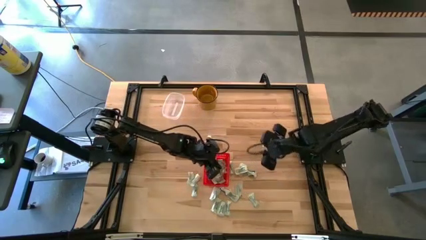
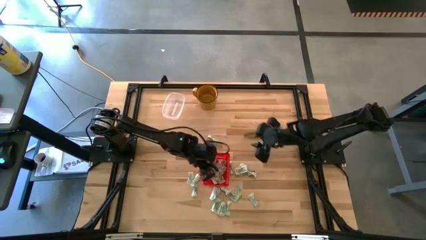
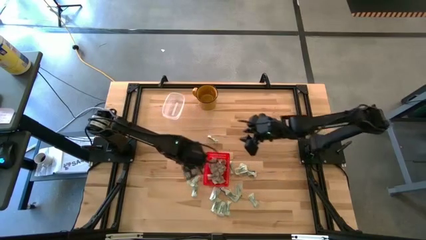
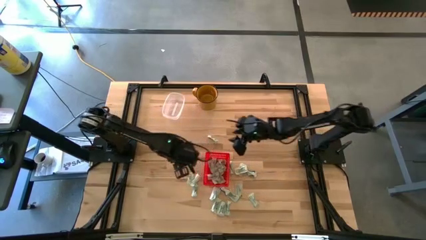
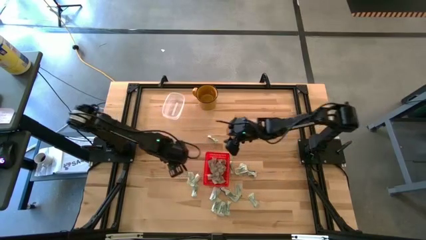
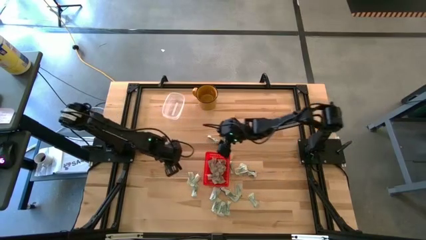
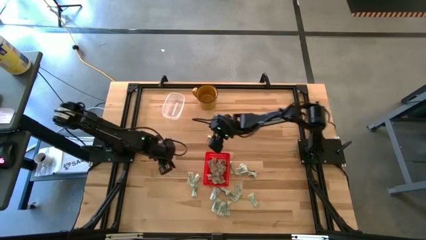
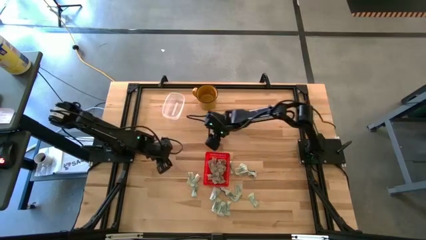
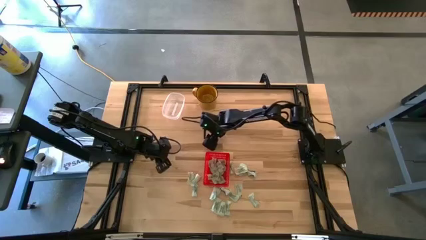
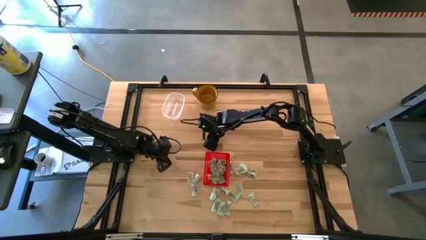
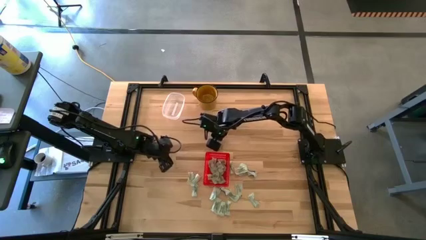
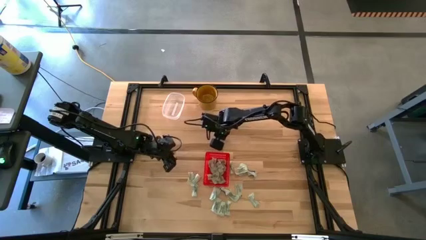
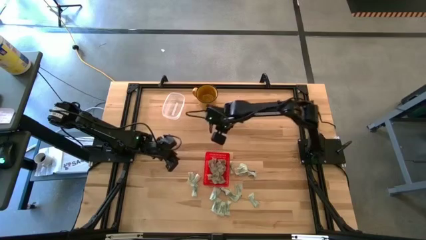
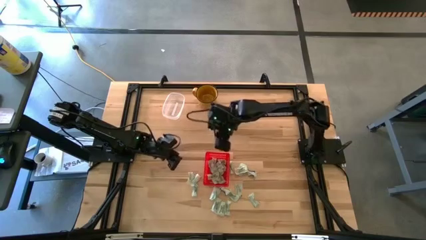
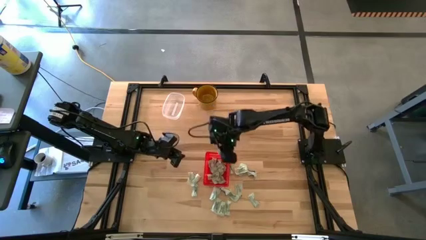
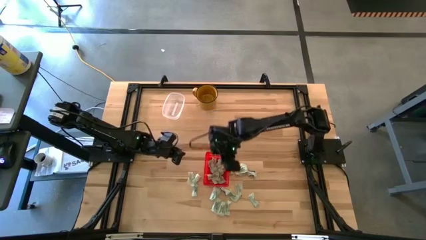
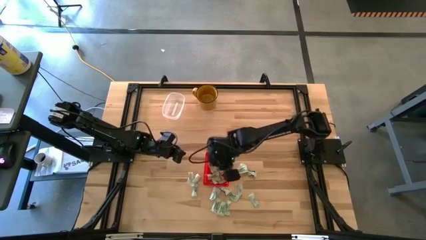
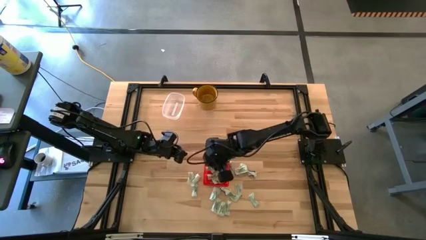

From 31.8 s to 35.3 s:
Task: Pick and place Stevia / Truvia into bins
Put the white stevia packet into the red basket

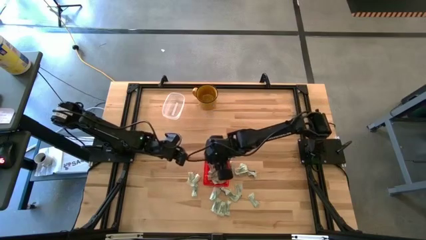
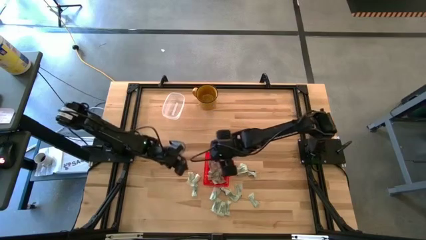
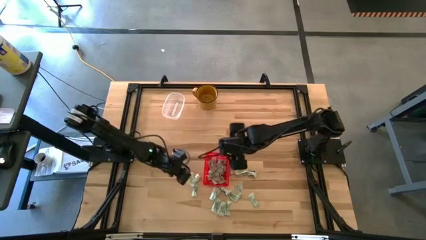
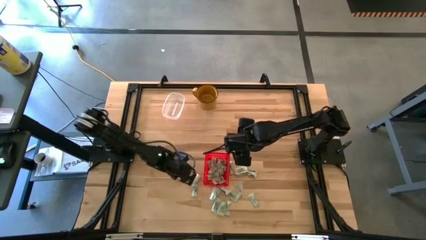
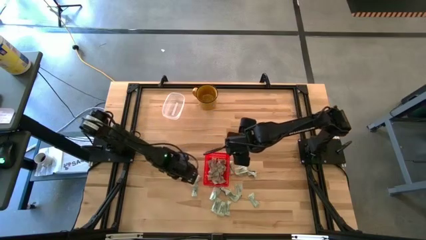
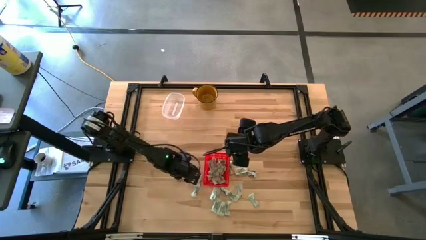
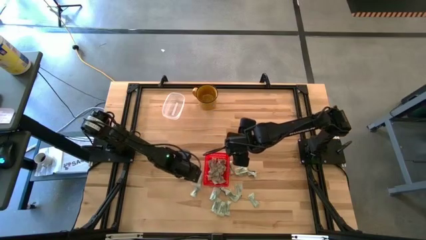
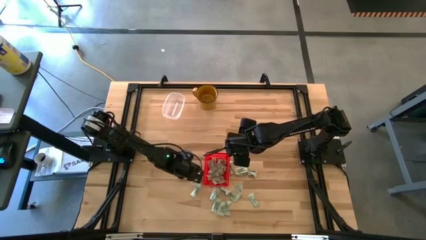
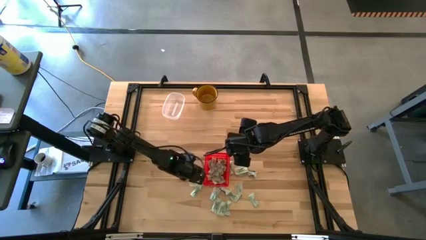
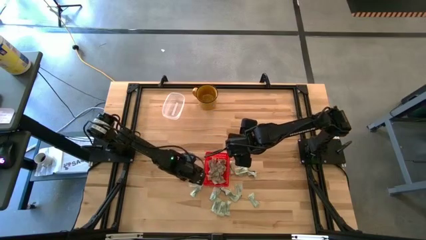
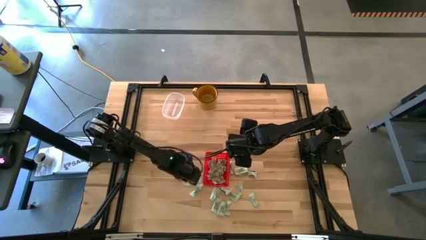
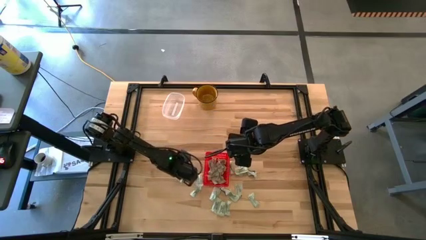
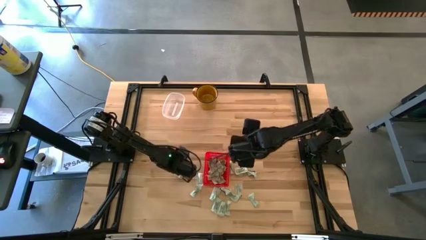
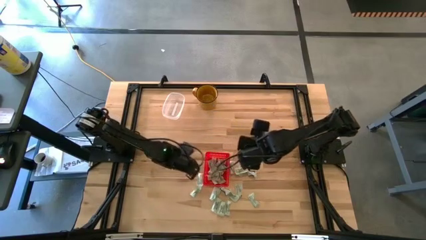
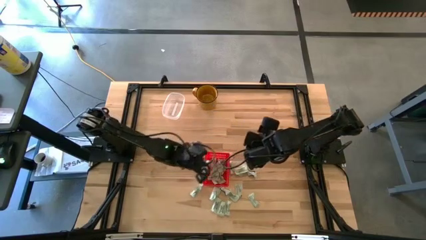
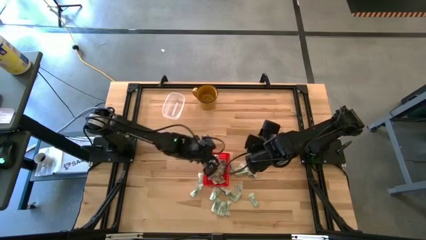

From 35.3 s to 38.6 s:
Put the white stevia packet into the red basket

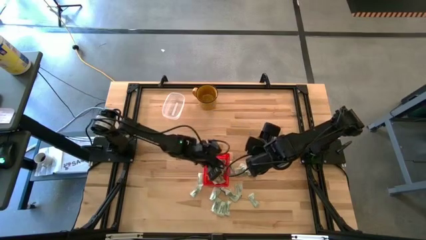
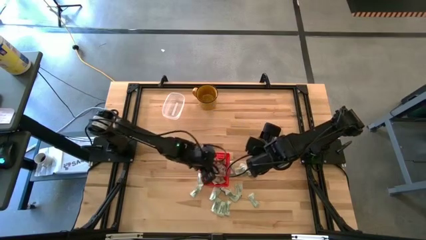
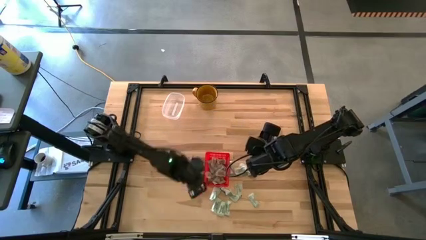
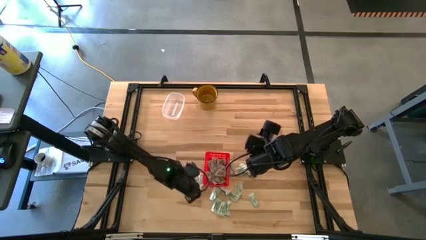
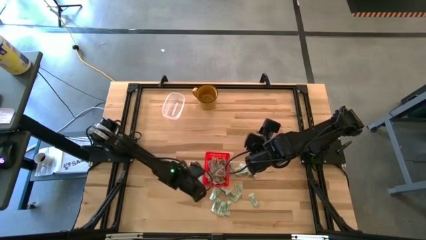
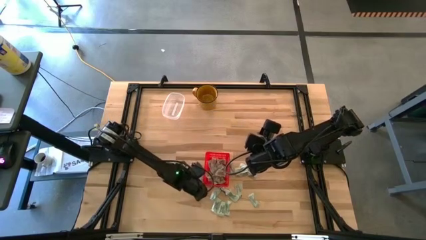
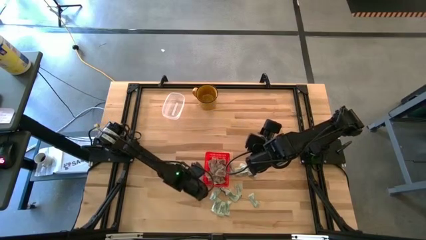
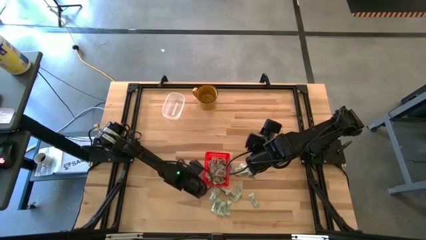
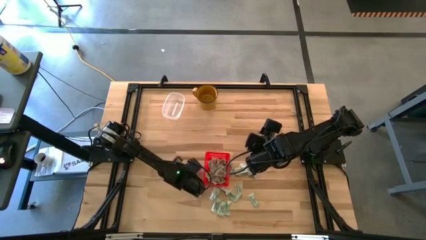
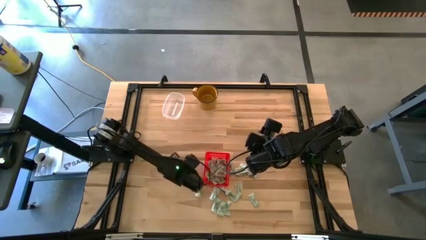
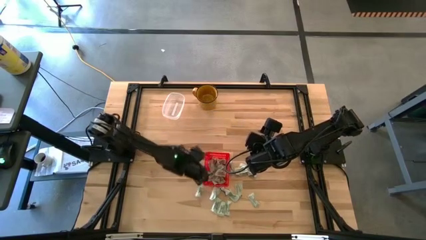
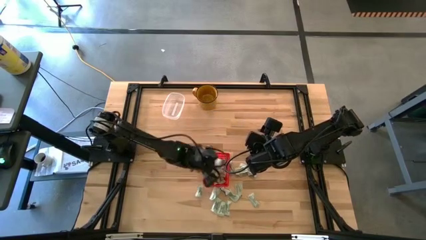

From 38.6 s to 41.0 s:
Put the white stevia packet into the red basket

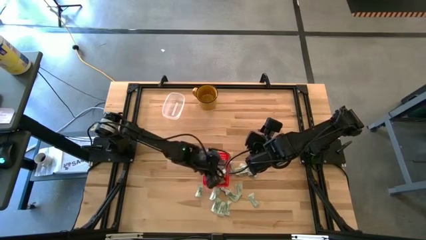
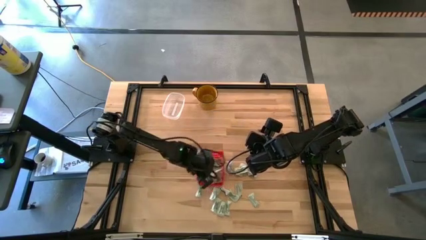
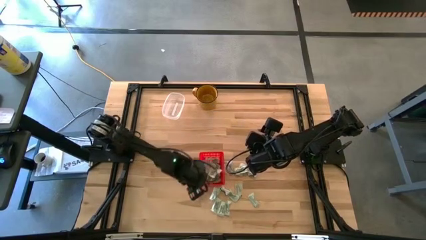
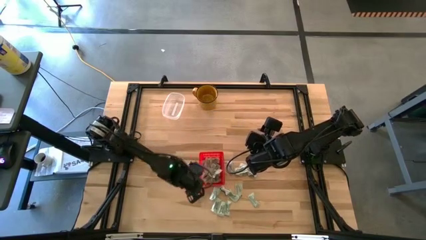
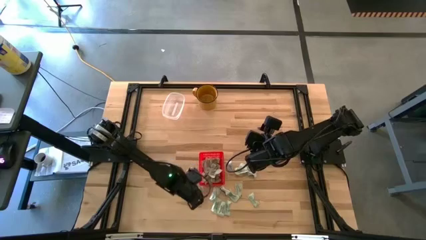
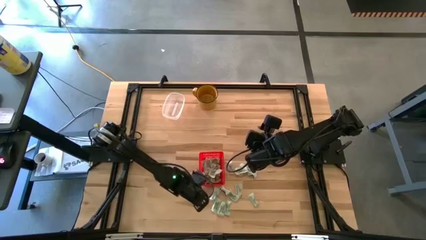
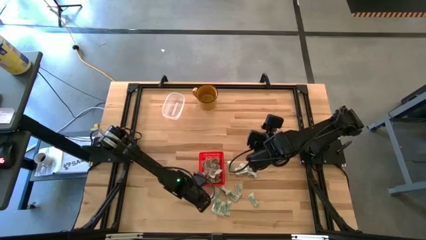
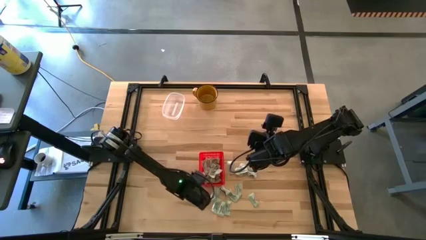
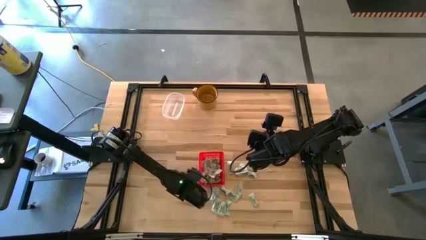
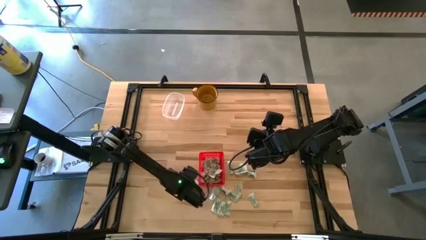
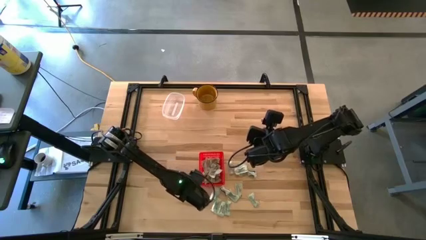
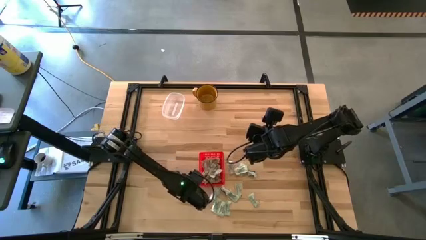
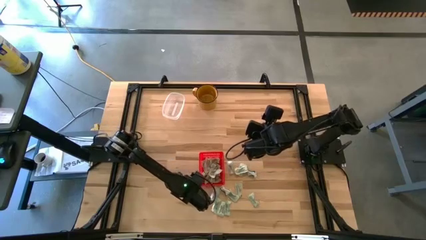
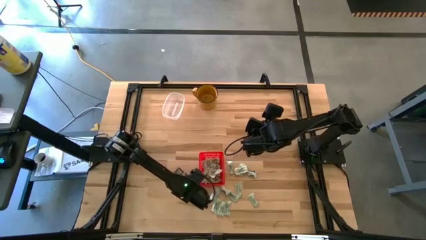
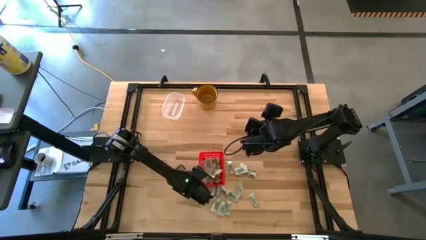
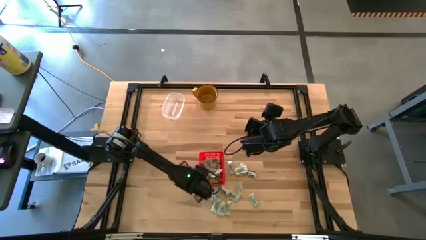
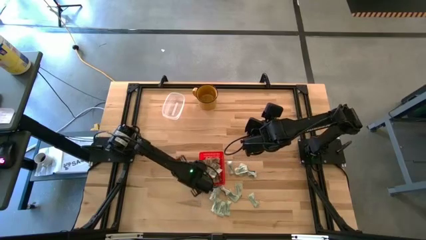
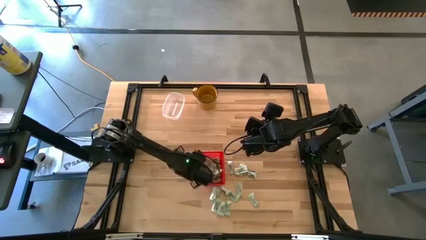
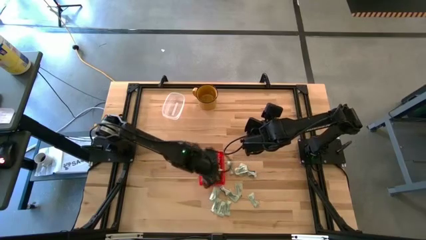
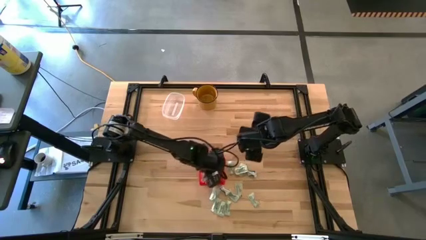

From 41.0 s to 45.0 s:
Put the white stevia packet into the red basket

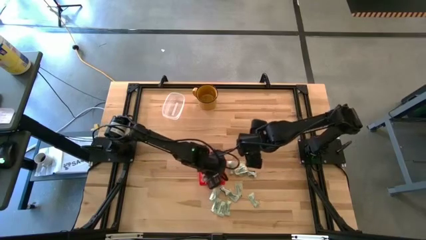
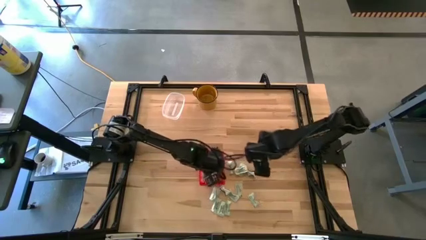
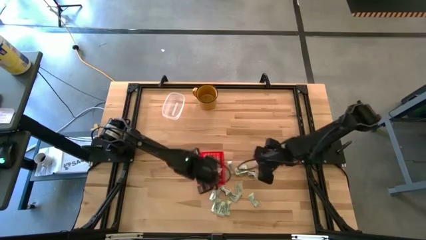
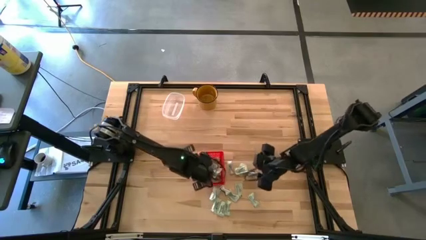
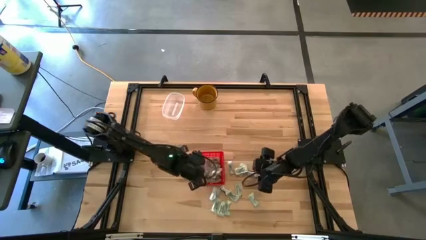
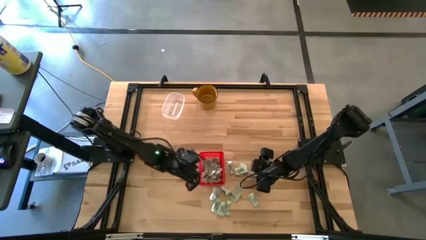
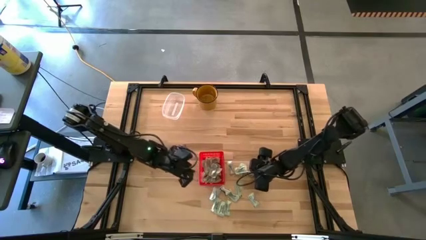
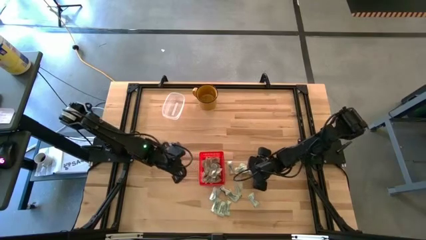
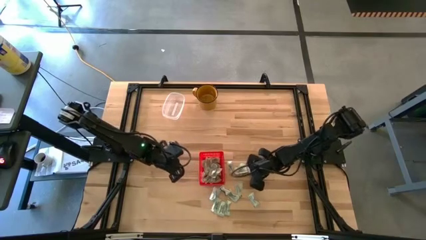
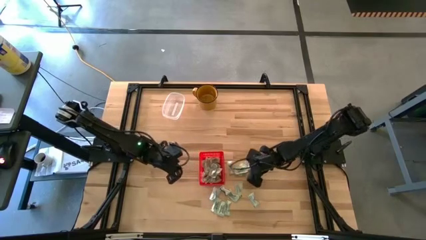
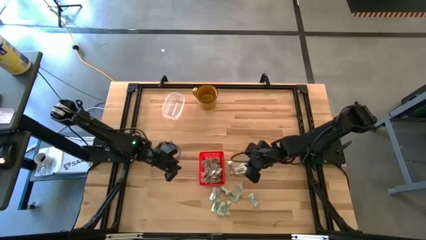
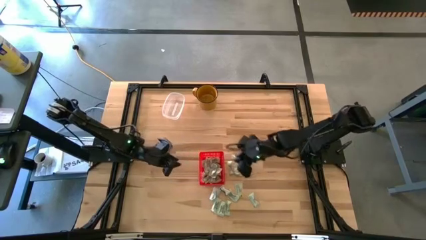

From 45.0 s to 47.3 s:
Put the green stevia packet into the red basket

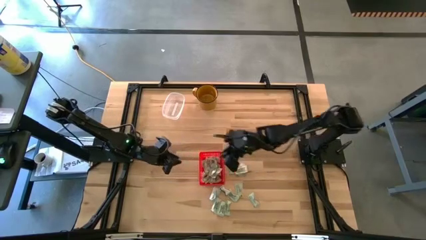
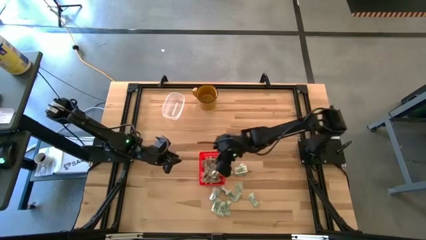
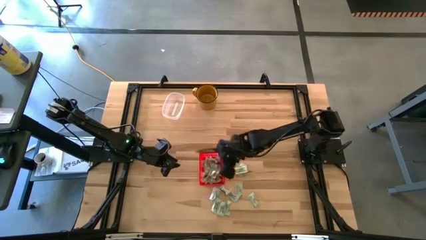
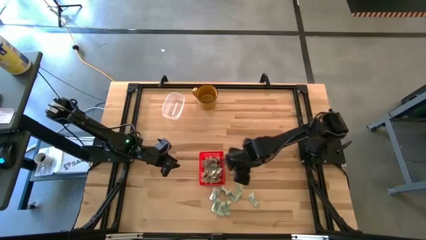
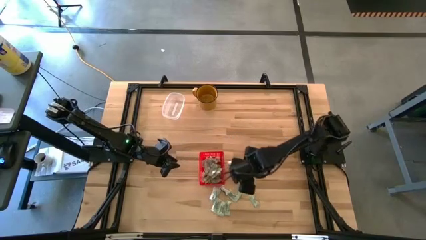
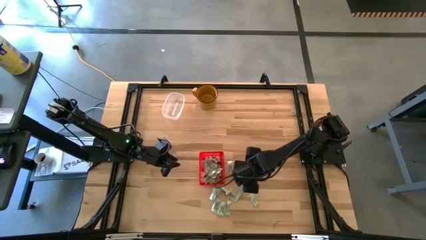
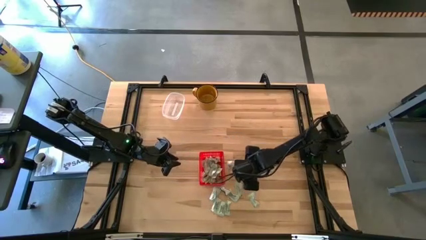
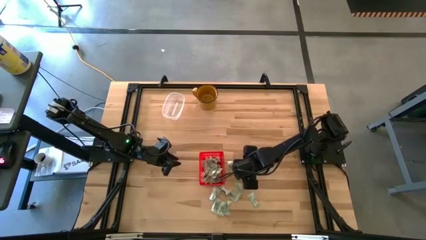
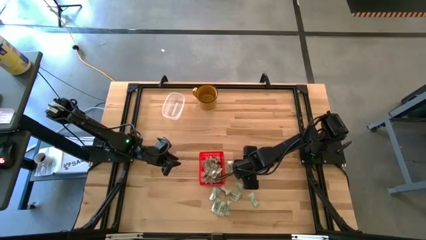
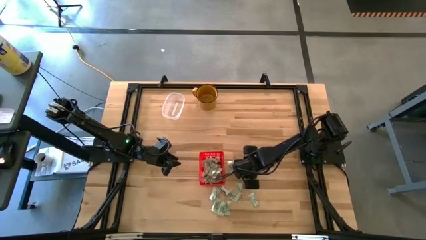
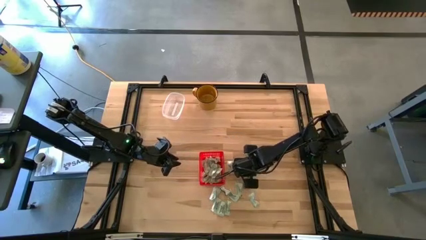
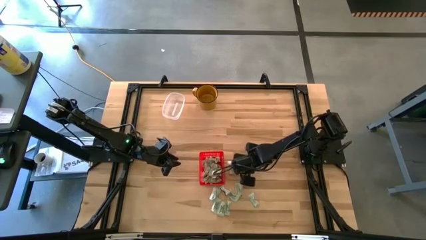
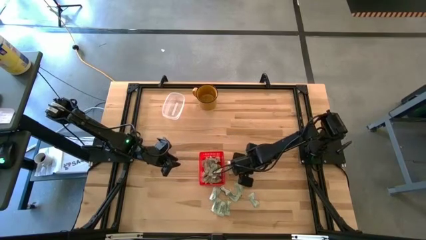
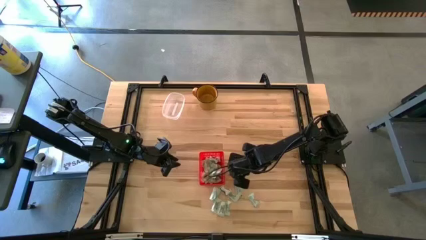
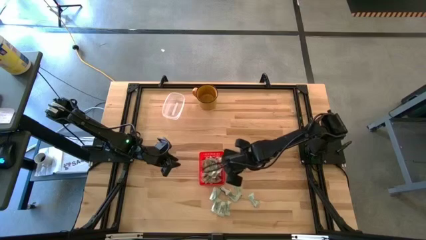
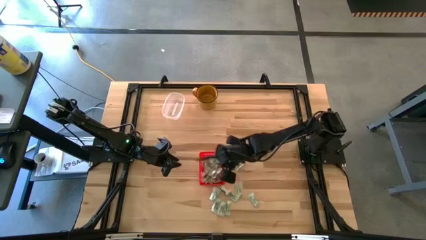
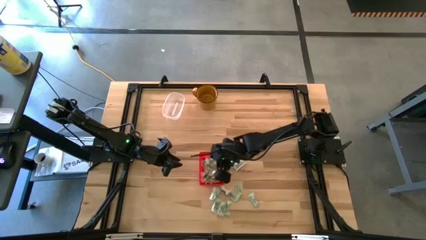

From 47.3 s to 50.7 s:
Put the white stevia packet into the red basket
